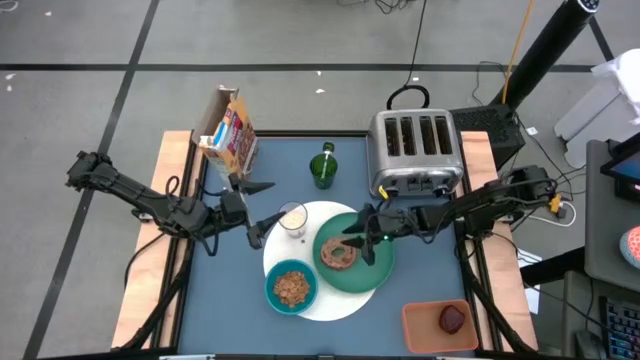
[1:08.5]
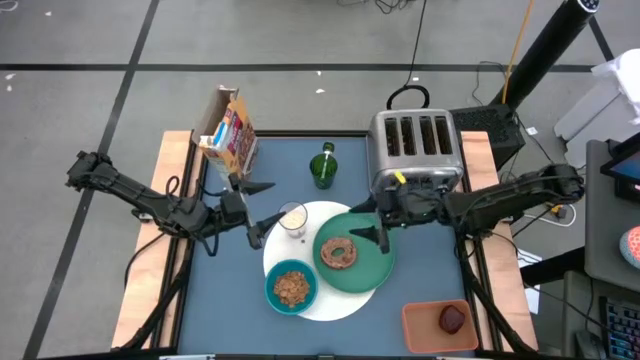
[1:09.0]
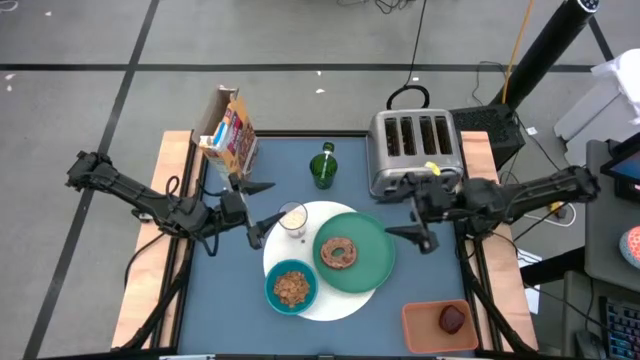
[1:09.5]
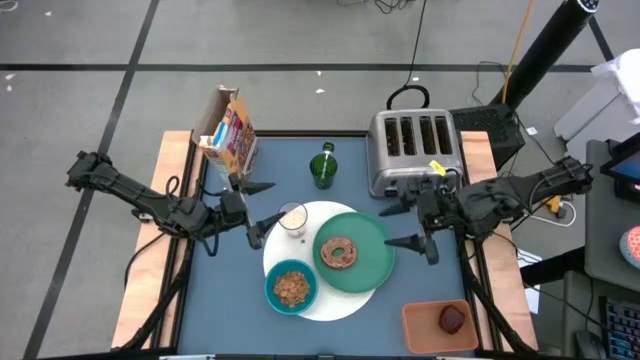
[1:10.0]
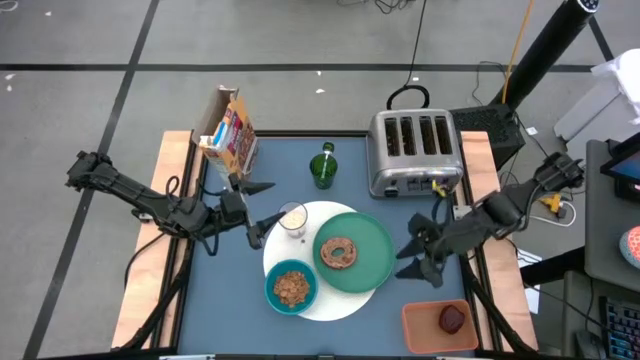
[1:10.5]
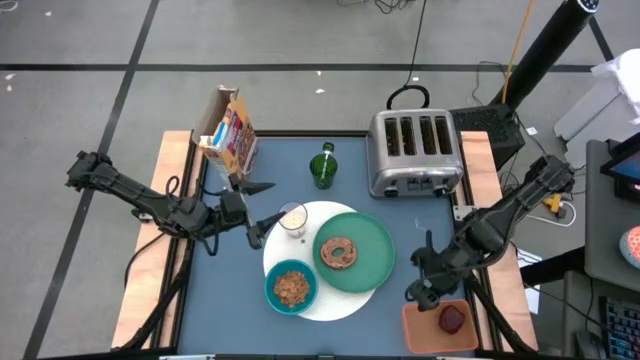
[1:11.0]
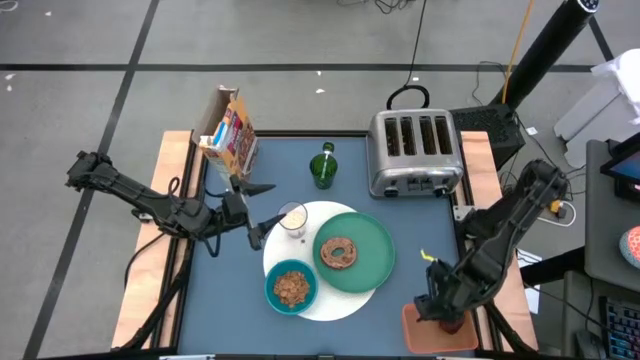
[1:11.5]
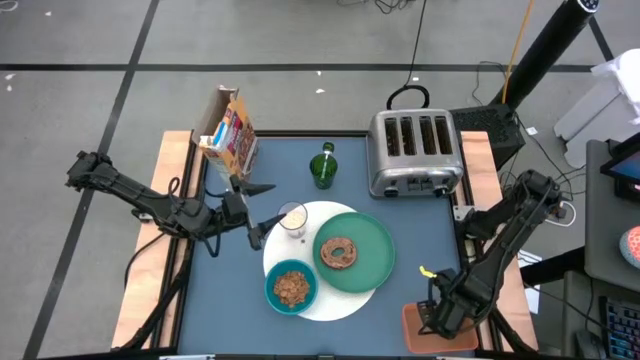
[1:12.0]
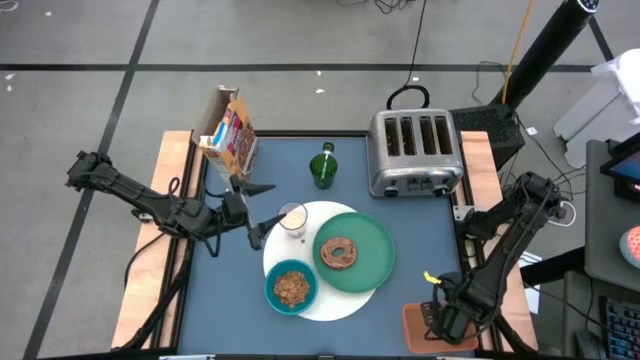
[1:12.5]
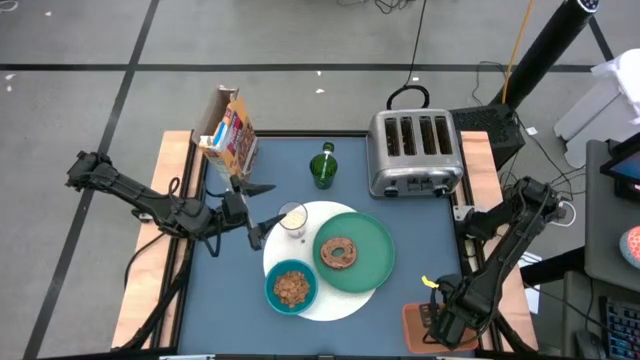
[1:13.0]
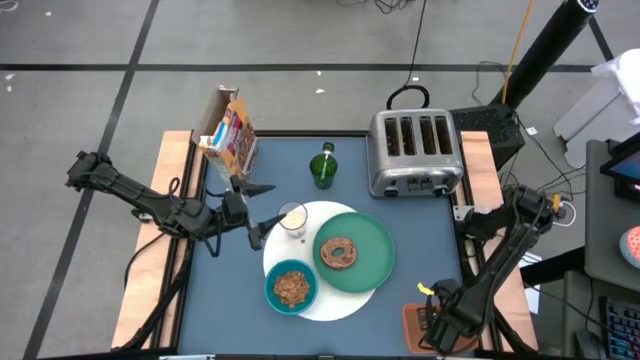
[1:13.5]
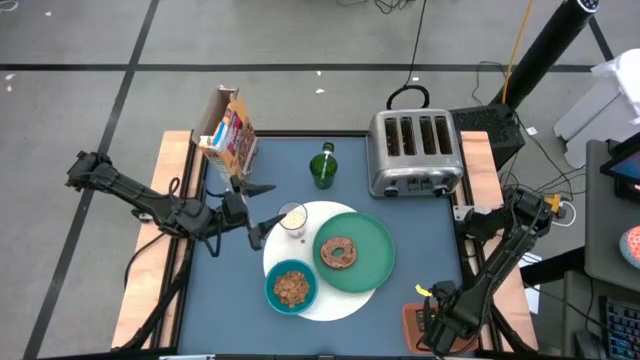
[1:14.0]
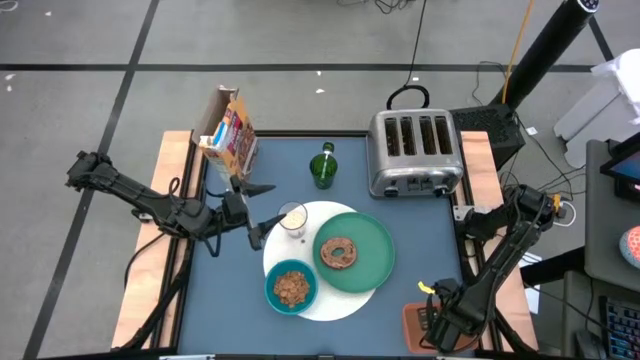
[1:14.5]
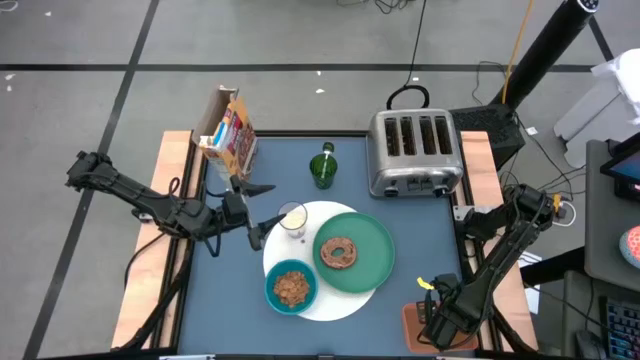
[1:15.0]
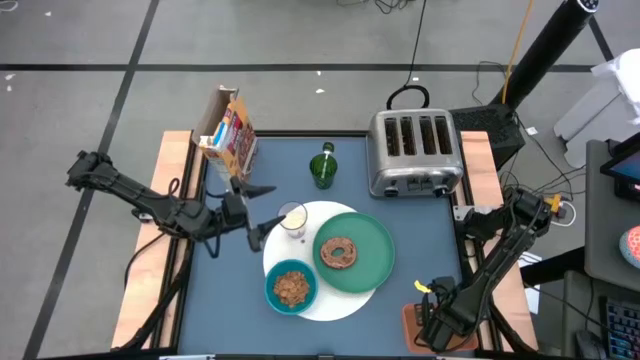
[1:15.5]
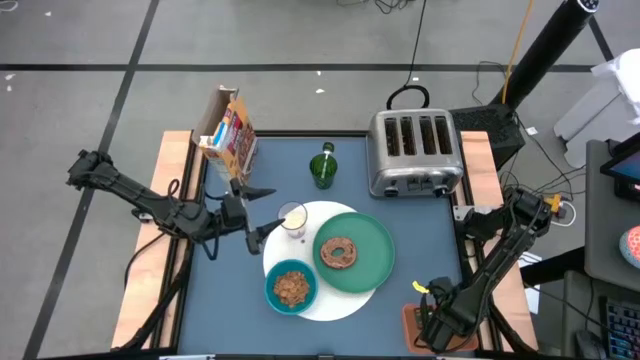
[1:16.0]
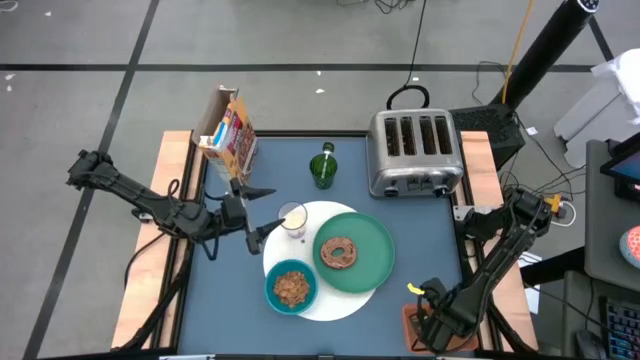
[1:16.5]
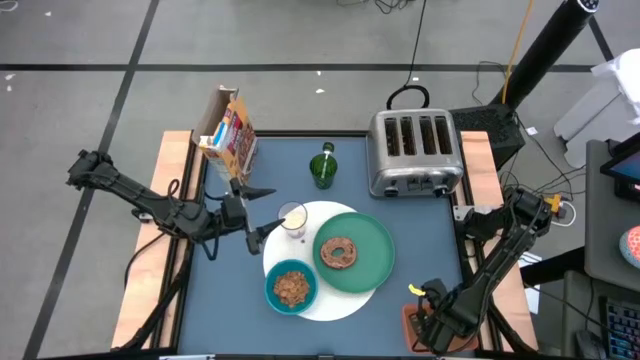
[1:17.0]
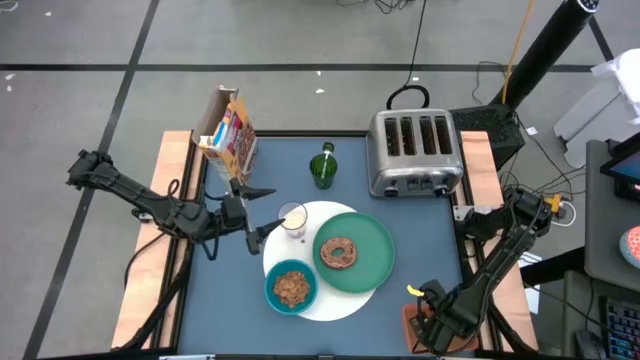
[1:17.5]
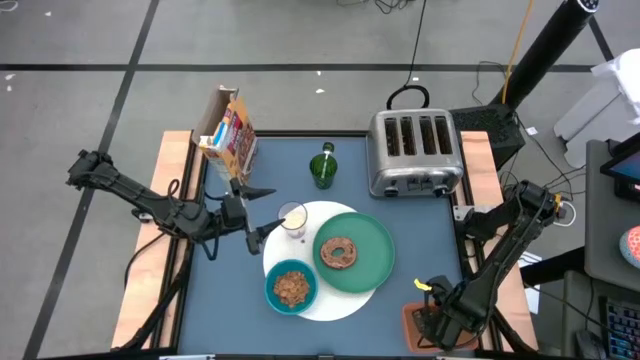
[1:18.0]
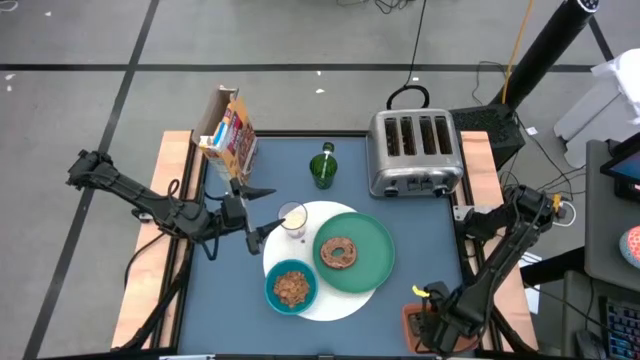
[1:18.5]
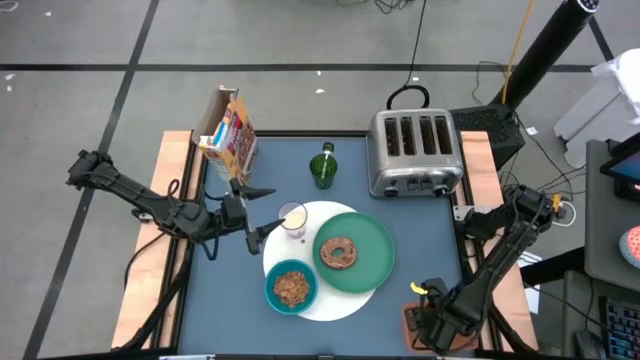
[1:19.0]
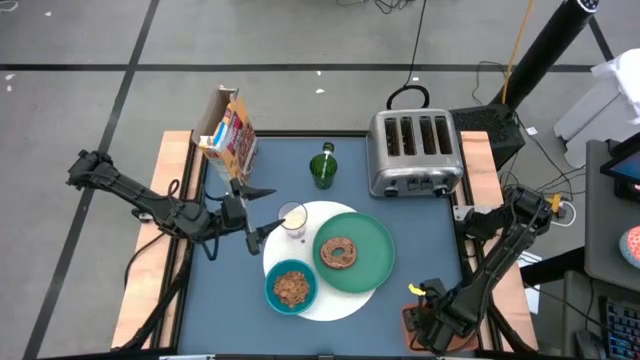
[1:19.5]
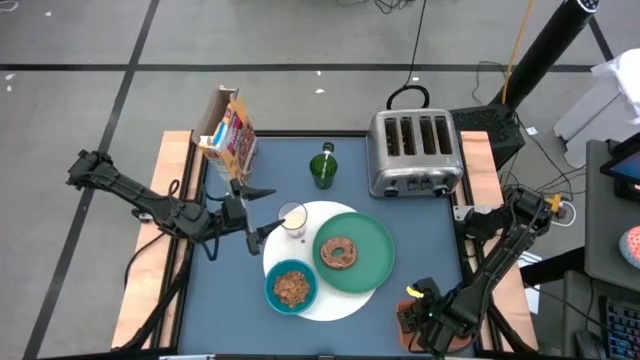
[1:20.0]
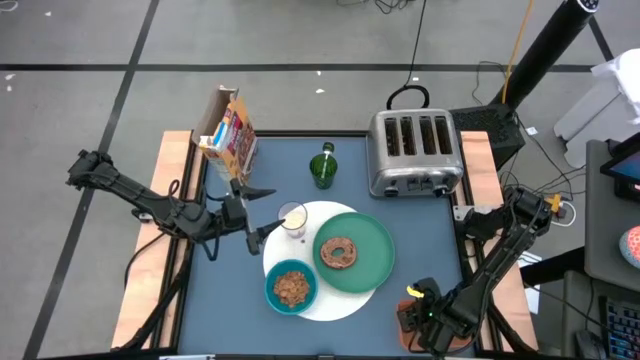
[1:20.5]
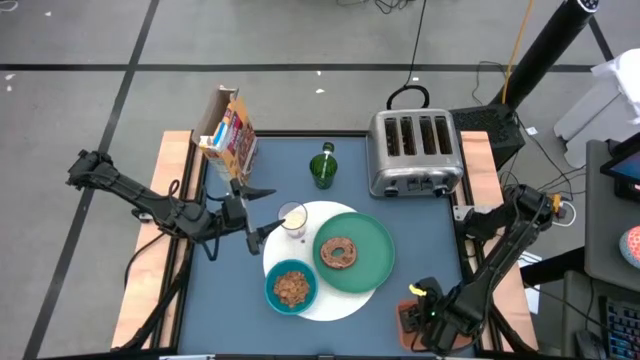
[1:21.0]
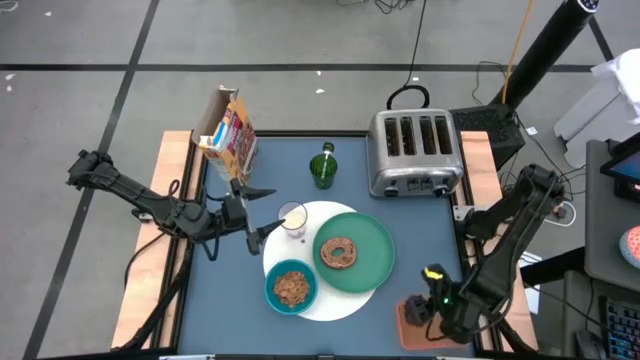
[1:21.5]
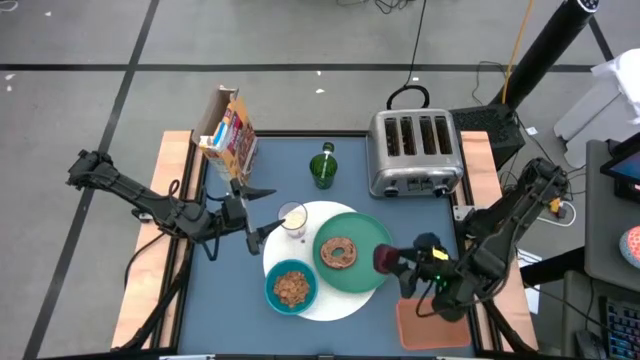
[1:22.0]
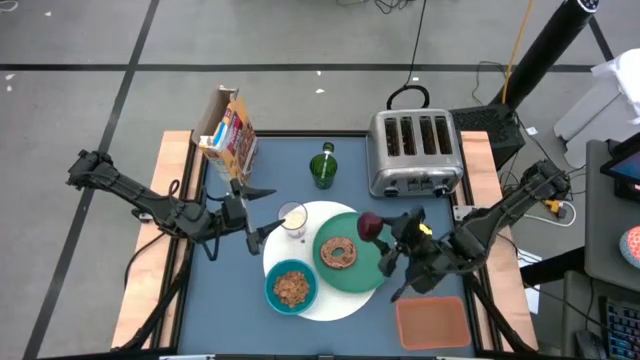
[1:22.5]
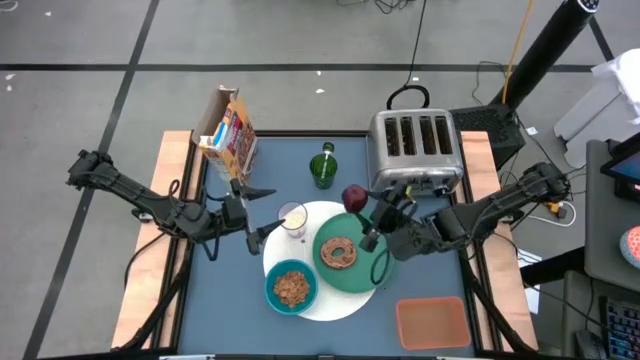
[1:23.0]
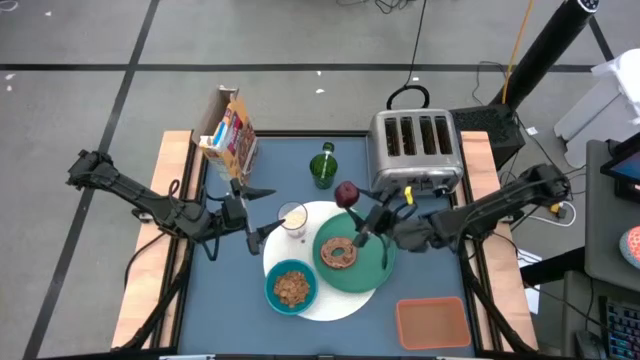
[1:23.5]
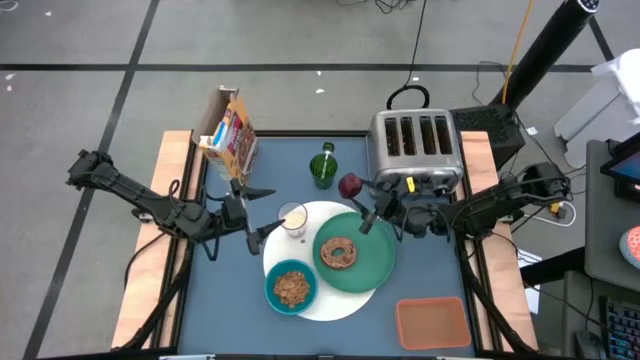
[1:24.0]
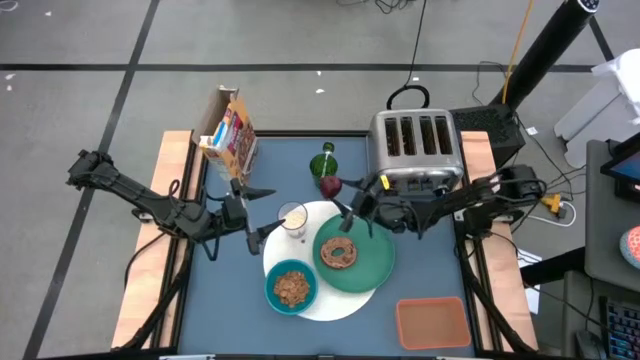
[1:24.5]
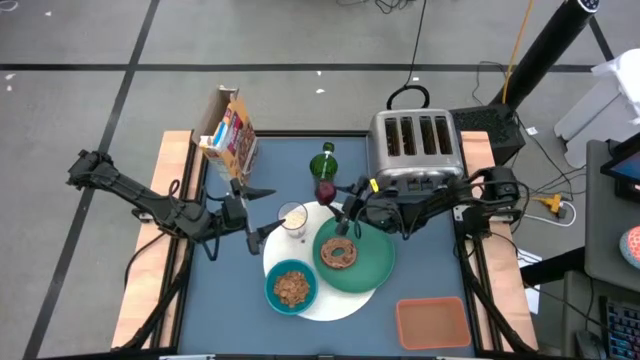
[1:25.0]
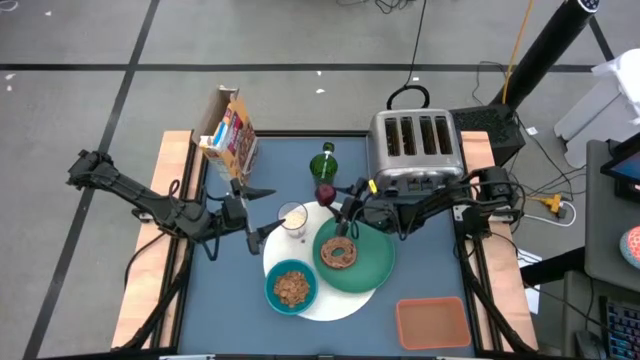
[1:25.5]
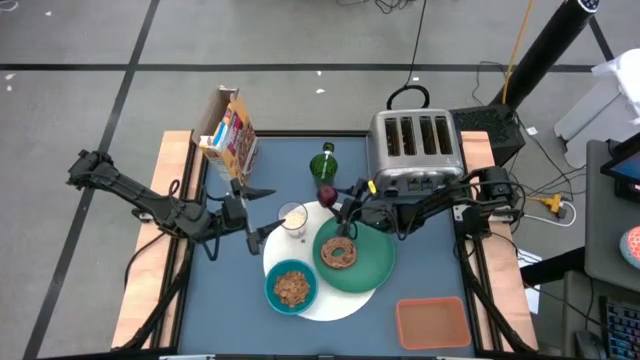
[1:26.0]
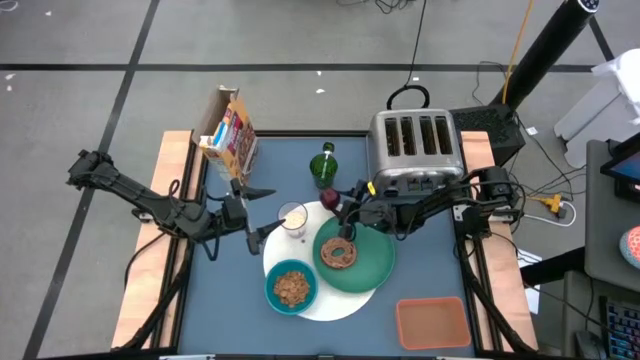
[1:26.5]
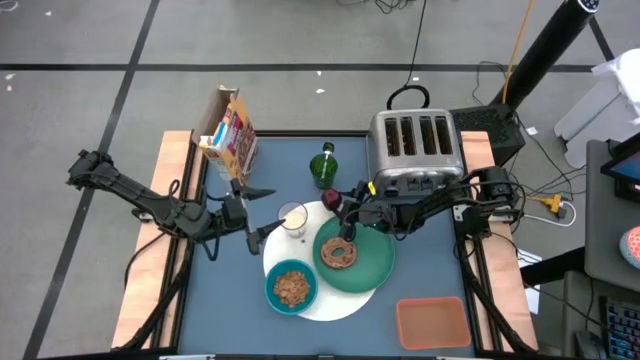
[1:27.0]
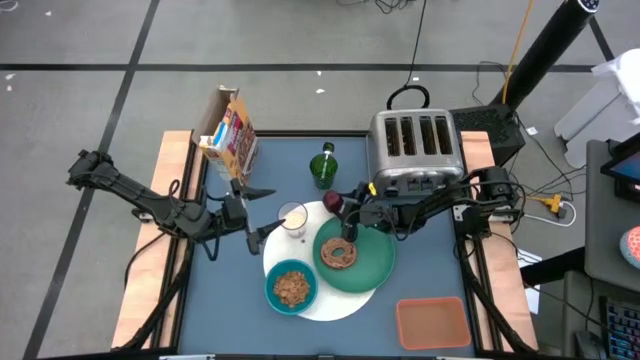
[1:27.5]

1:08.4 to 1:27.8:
Task: Arrange a breakfast setting
Put the apple from the orange bin on the top of the white tablemat

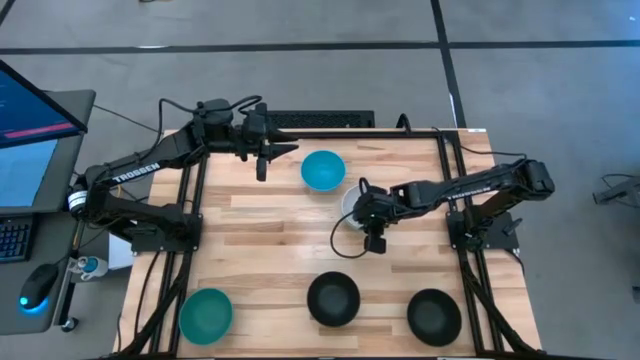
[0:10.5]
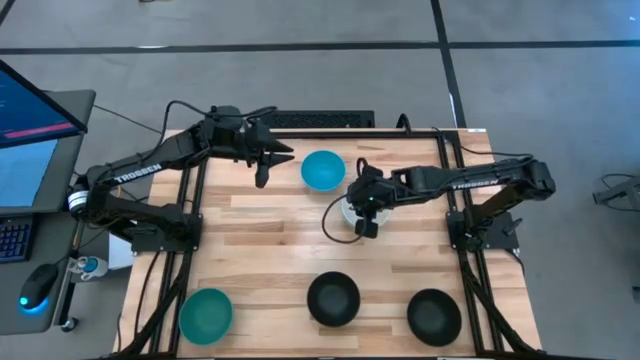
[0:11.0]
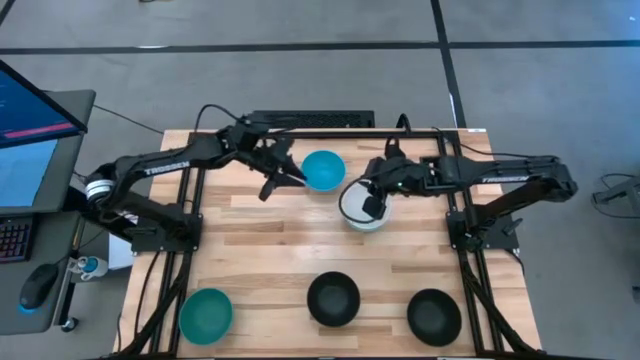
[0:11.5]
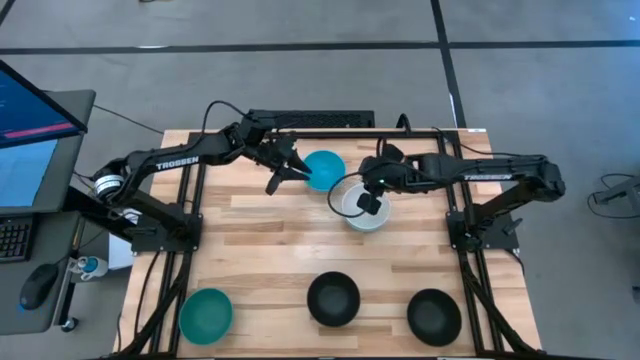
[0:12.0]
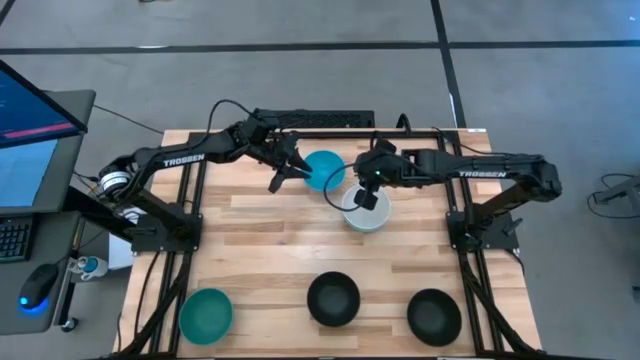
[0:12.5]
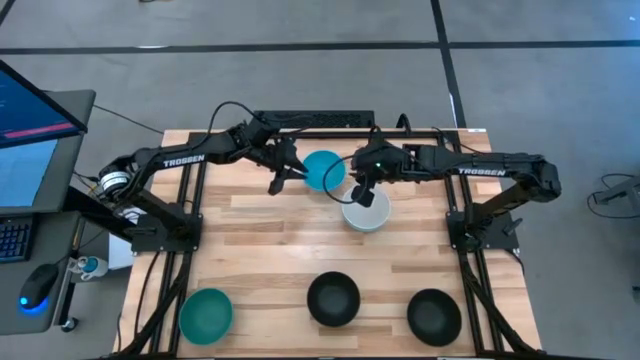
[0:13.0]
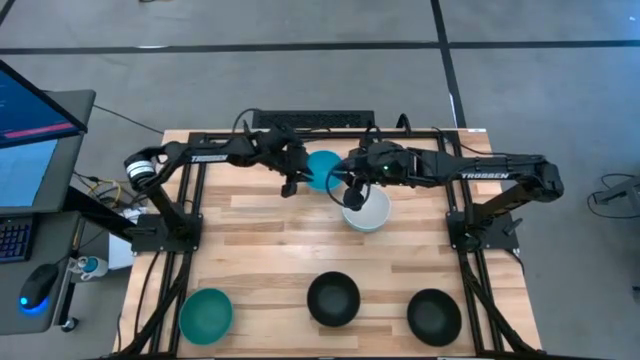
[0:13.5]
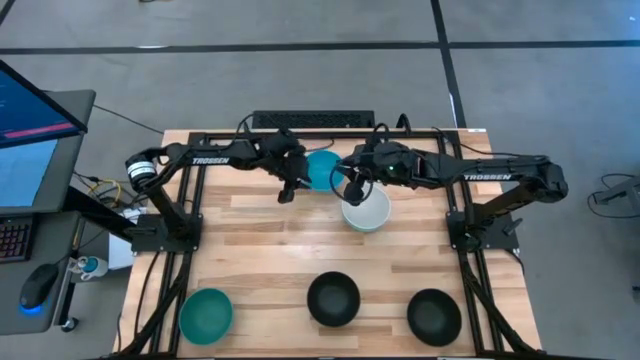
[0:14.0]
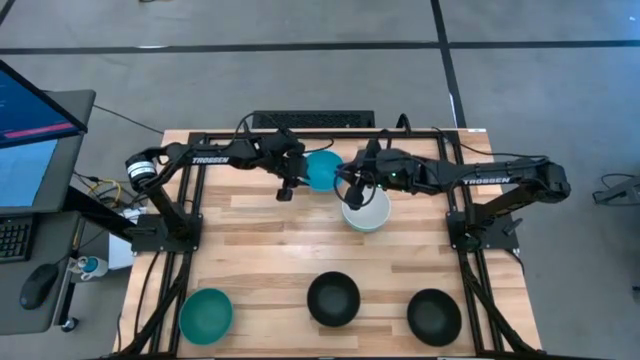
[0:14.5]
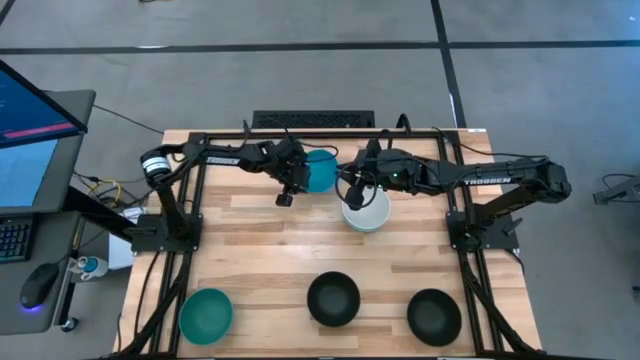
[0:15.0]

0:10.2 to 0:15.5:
Task: Nest bowls inside each other
Stack the blue bowl on top of the white bowl
